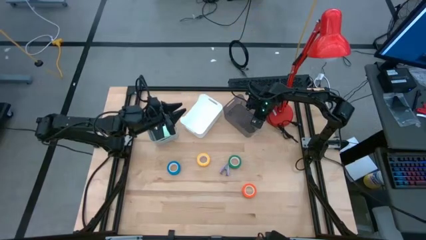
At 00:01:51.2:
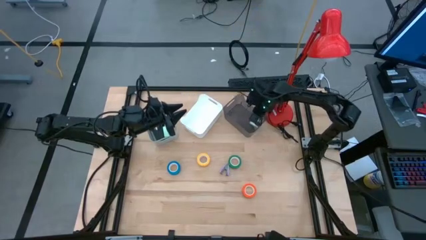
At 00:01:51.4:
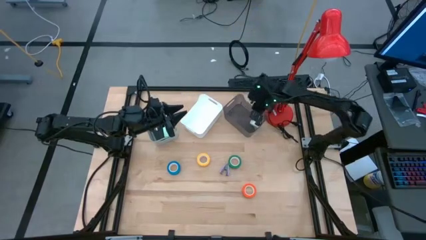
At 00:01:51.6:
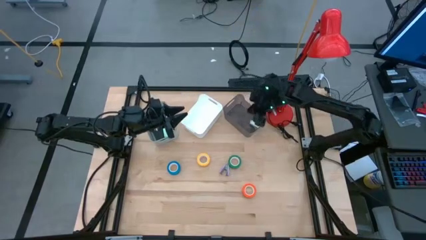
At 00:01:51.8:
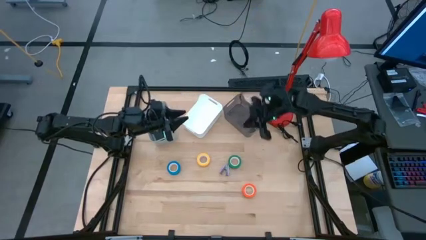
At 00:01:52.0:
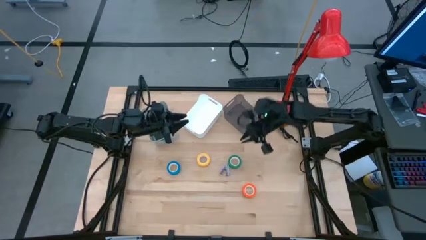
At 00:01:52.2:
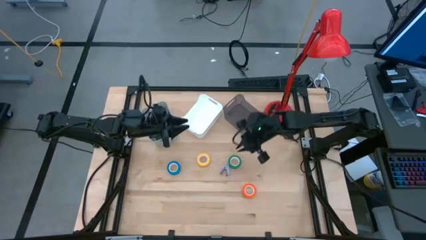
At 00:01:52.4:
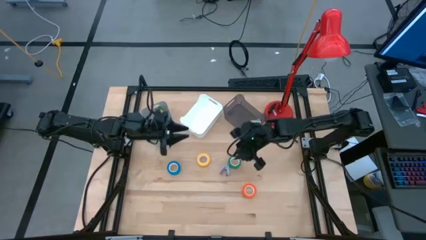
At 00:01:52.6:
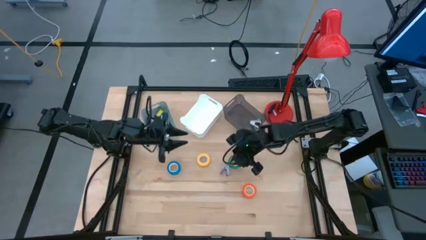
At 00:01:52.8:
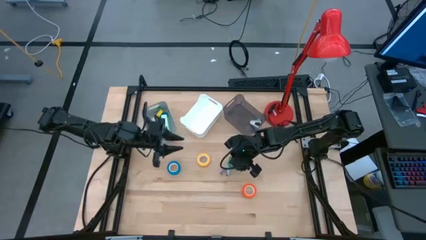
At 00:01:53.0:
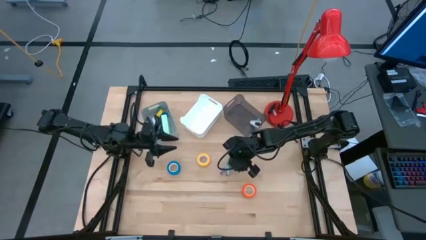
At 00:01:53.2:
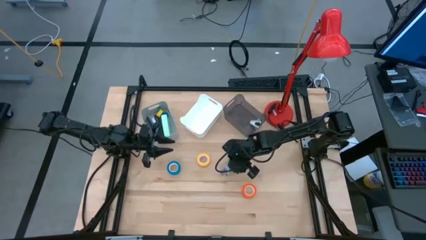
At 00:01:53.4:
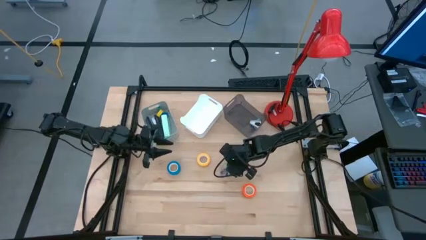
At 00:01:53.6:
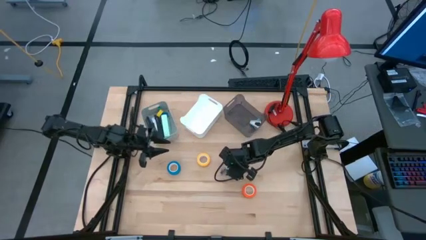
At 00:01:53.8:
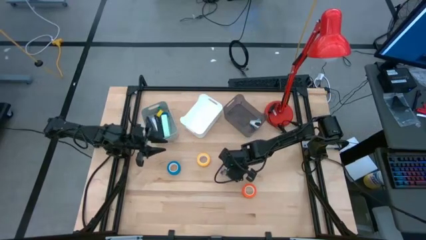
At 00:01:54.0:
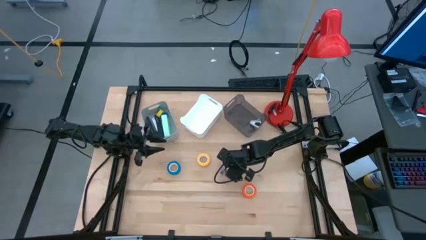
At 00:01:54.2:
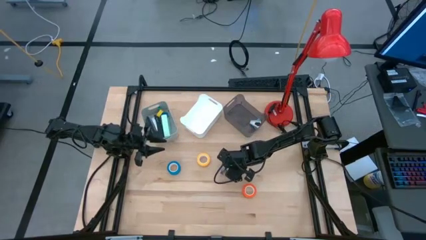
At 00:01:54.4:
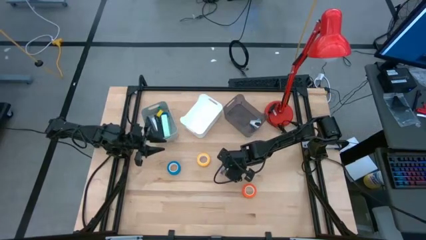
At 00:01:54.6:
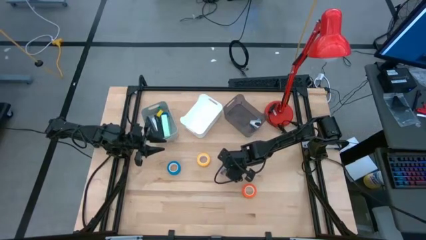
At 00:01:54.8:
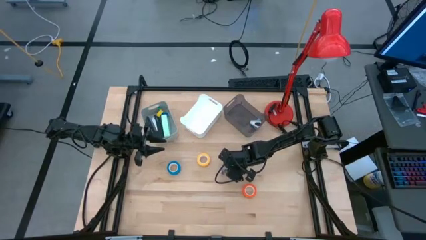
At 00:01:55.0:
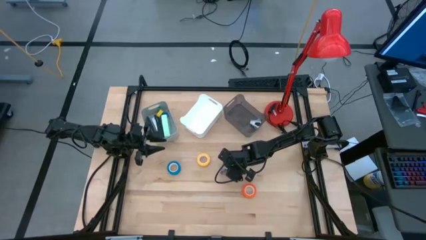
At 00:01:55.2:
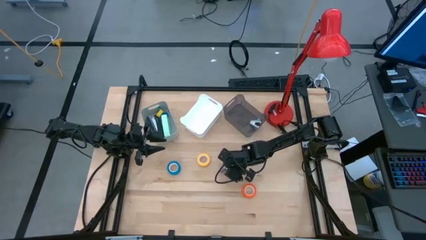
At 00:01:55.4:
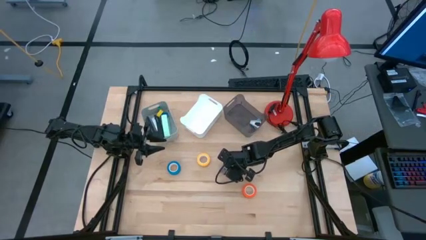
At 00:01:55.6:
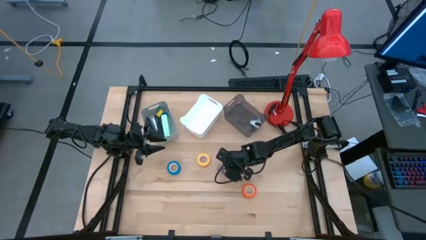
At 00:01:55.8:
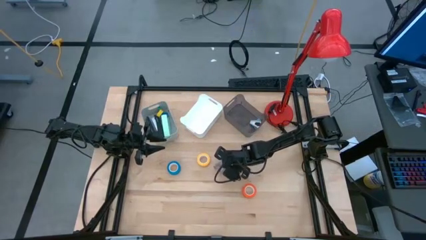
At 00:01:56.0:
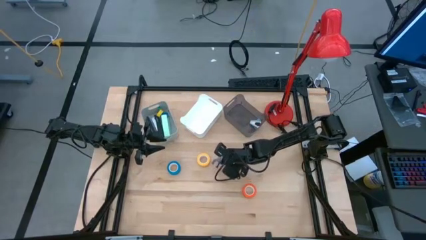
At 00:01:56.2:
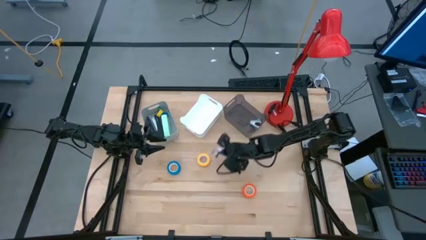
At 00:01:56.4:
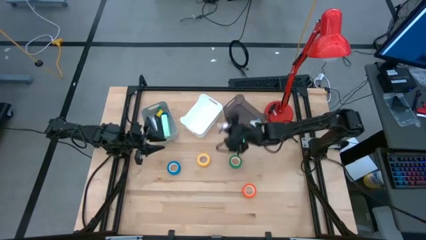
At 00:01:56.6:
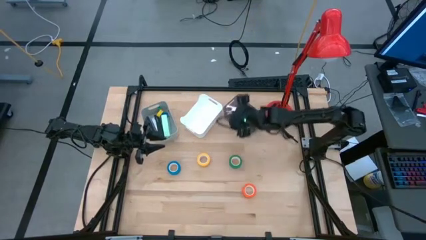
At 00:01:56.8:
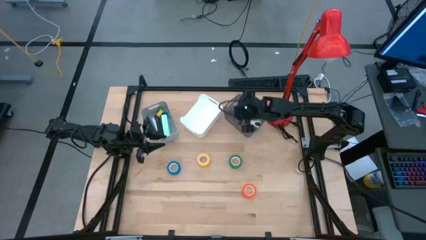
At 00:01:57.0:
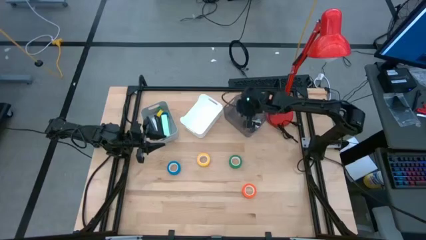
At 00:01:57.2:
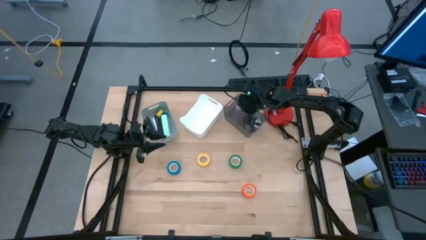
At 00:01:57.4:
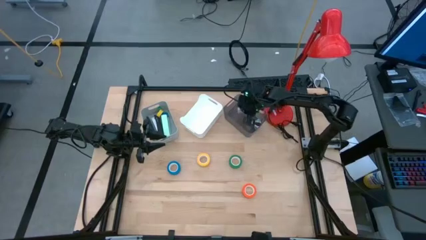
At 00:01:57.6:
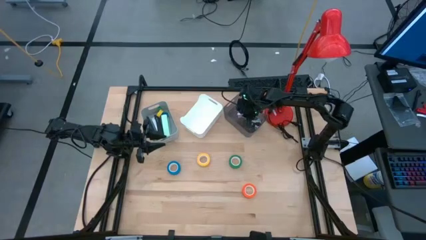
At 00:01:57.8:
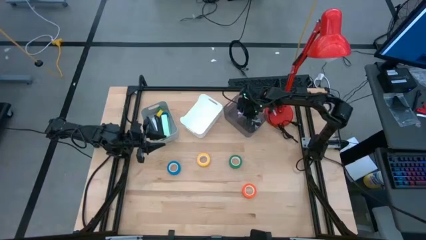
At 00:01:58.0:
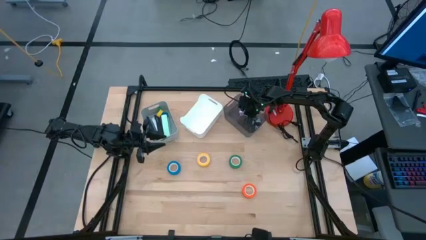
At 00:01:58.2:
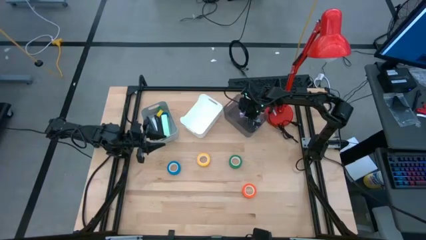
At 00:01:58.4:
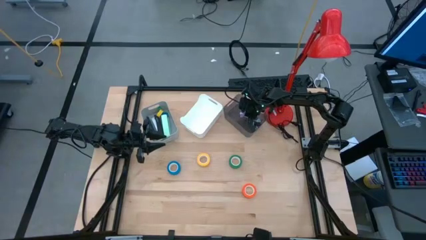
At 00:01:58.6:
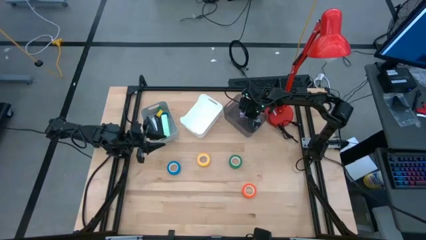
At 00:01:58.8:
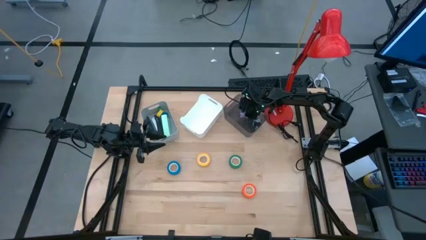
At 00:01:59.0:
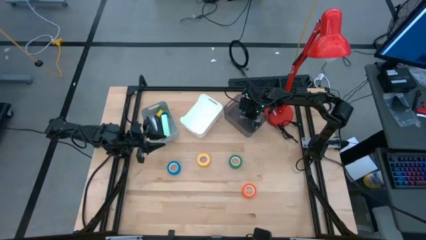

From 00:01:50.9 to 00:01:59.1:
Task: Pick and place Stapler, Stapler remover, tape
Put the purple staple remover into the black bin

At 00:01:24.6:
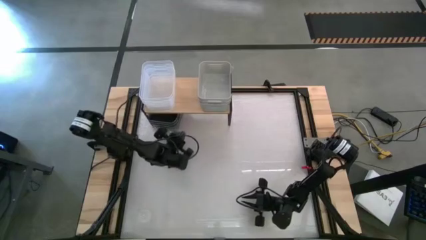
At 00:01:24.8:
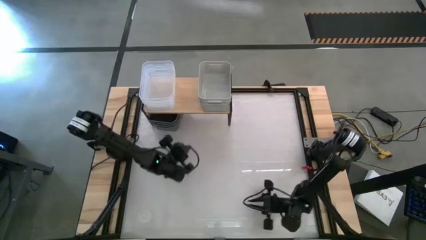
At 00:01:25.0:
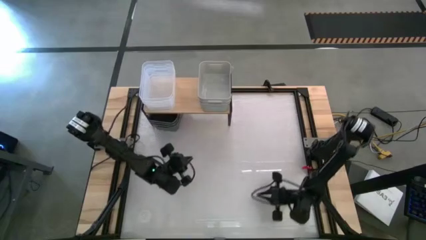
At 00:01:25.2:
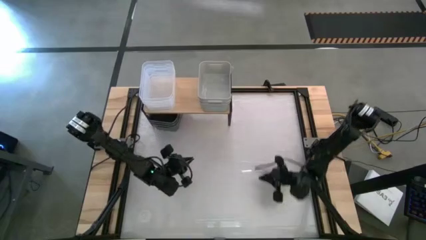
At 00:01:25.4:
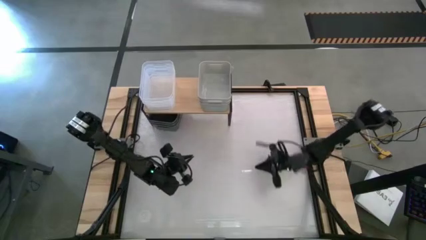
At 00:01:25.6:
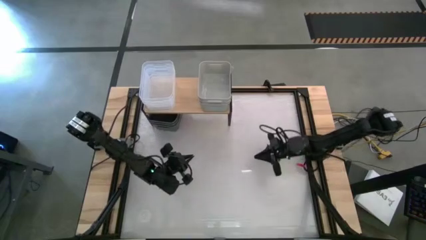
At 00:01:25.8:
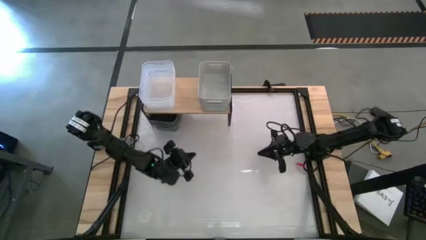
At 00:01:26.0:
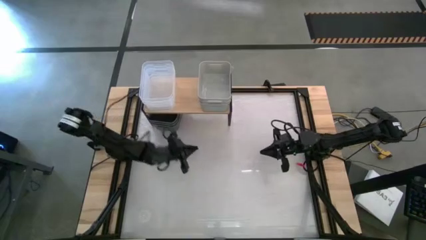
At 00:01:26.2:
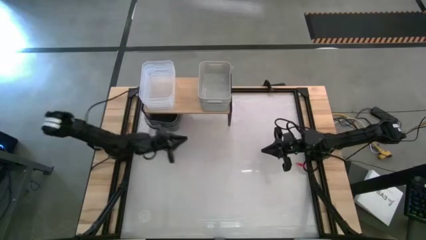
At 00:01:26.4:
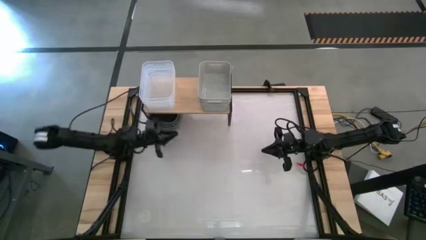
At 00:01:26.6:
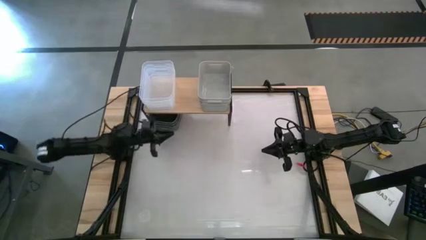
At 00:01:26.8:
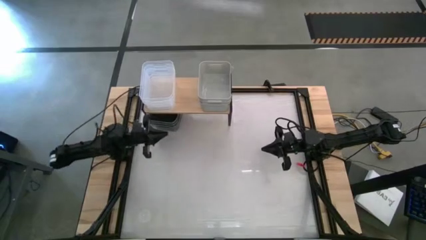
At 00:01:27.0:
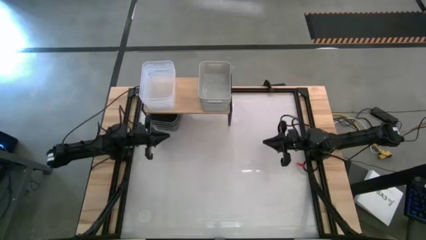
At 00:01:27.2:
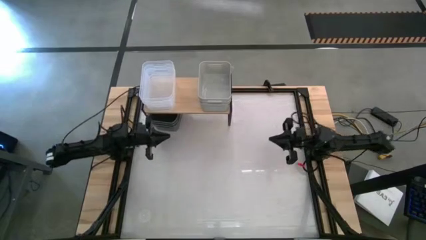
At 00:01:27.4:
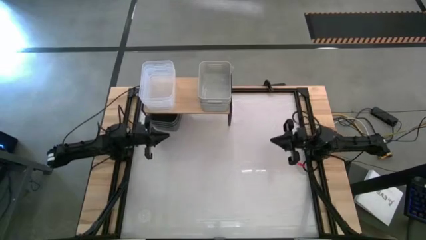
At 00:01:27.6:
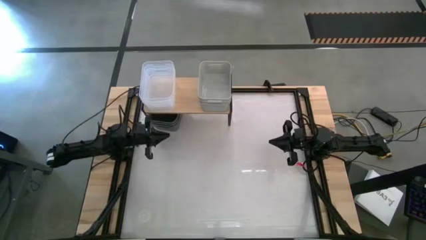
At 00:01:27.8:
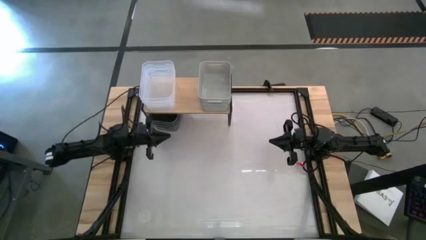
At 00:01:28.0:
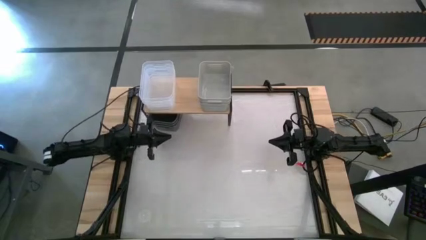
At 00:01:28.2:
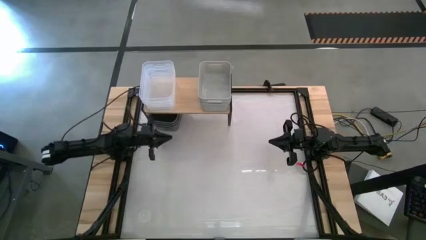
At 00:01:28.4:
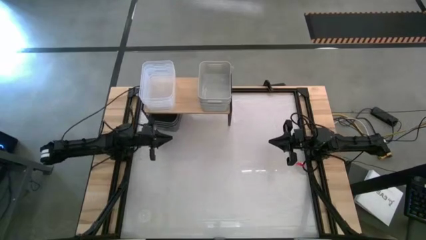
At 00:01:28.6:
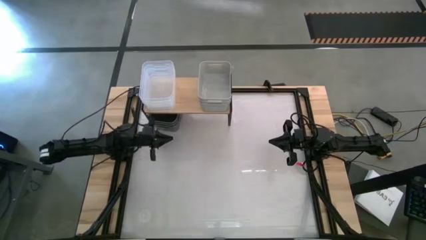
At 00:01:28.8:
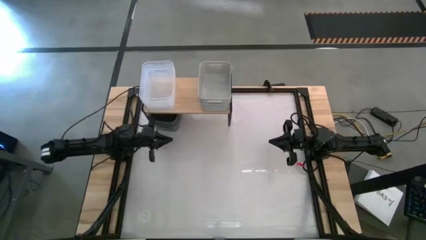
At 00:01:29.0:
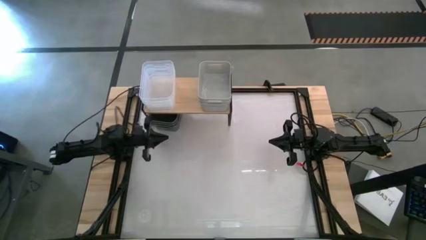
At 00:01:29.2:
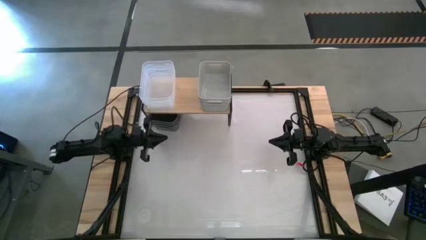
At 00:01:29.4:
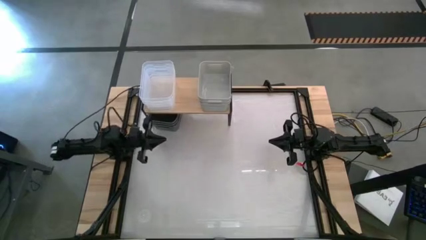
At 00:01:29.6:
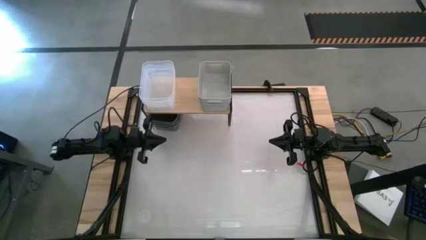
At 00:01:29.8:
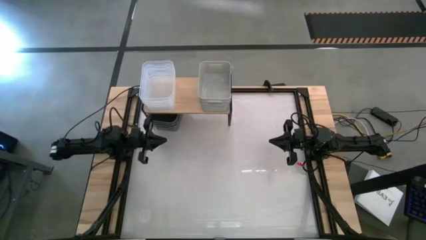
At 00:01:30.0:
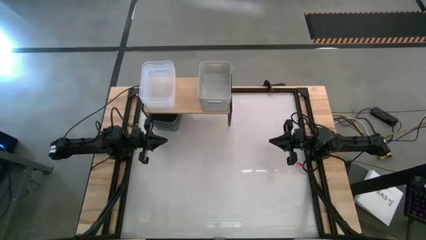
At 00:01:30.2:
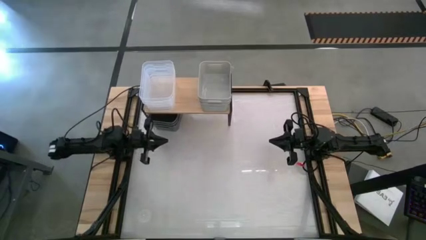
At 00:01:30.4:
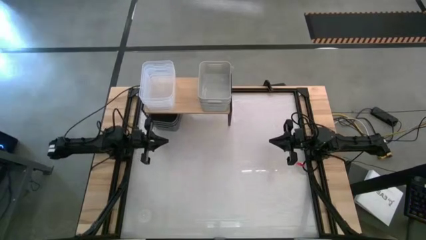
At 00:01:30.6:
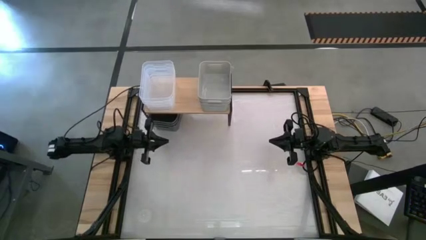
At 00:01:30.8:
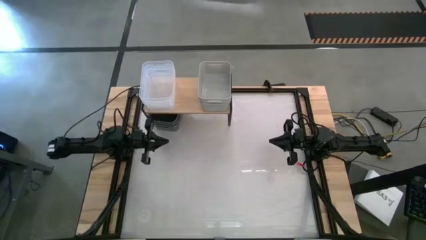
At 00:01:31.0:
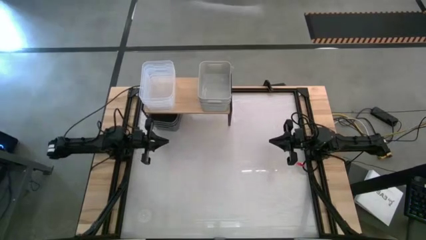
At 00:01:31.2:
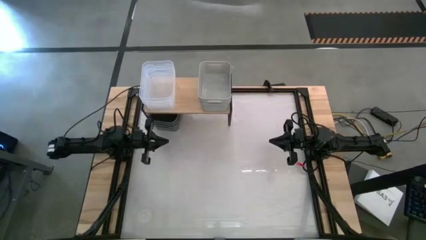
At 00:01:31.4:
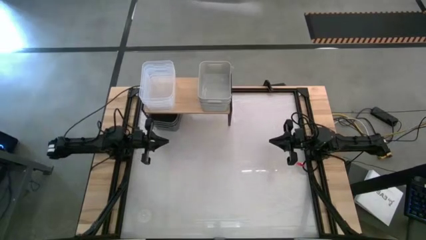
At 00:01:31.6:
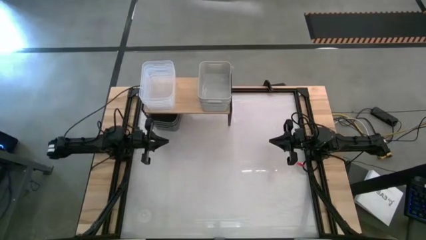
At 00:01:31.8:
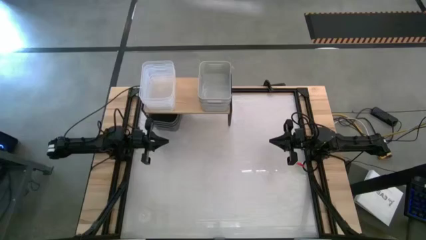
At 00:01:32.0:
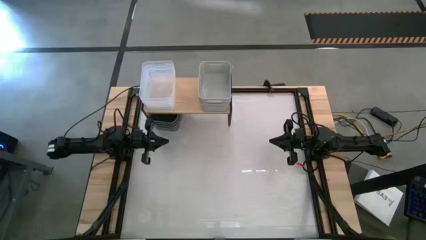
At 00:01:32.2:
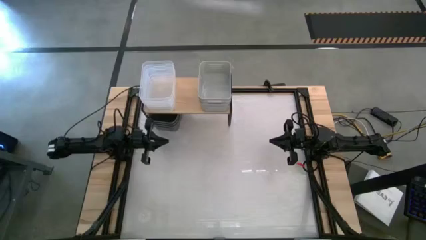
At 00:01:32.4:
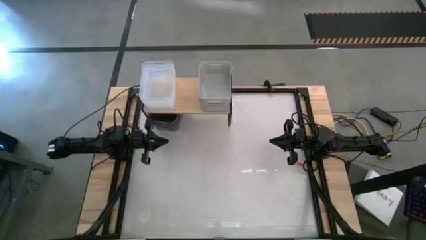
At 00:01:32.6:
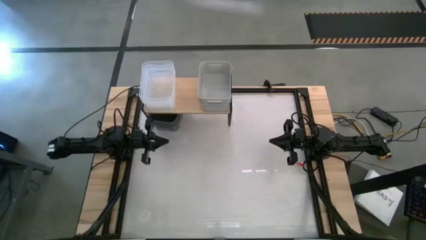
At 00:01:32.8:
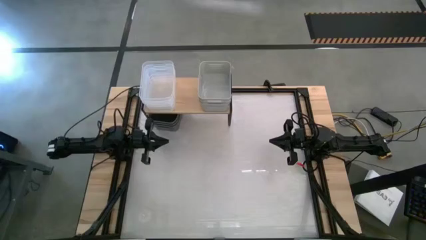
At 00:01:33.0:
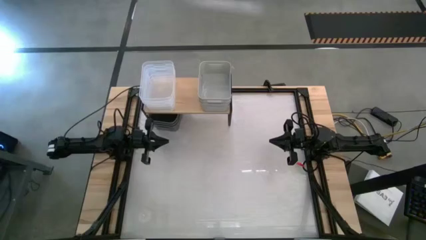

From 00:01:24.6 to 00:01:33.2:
Task: Stack baskets on shelf by color
Return to Home Position
